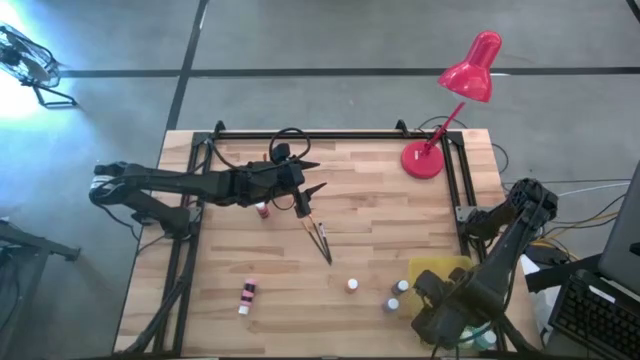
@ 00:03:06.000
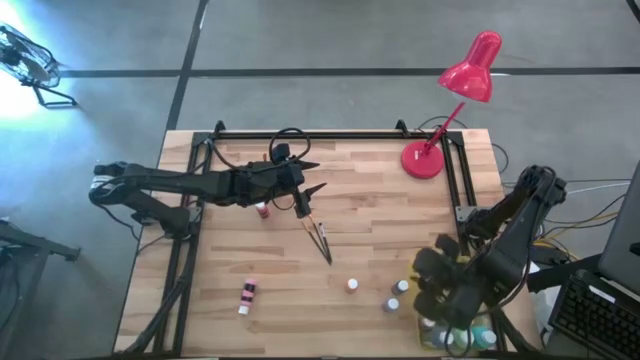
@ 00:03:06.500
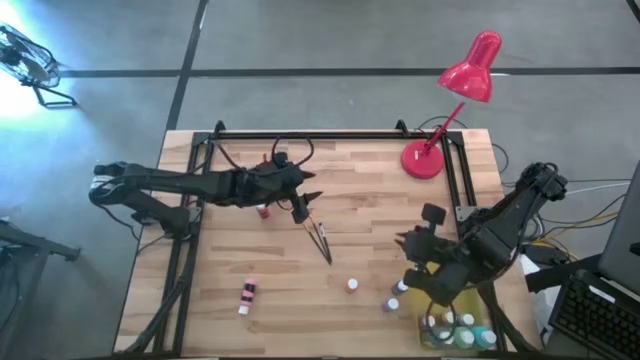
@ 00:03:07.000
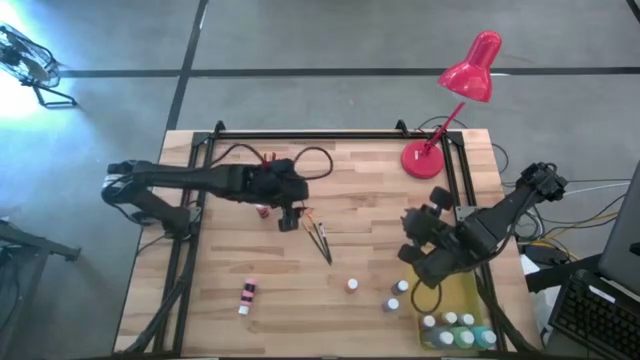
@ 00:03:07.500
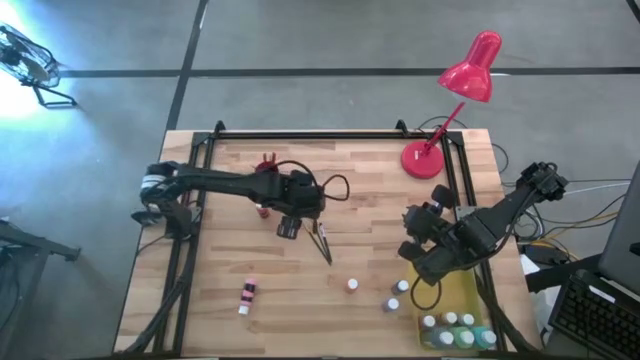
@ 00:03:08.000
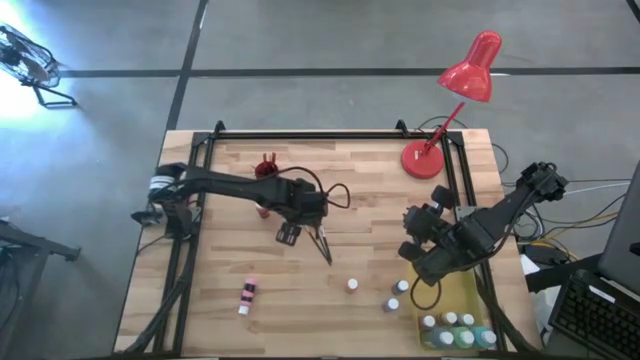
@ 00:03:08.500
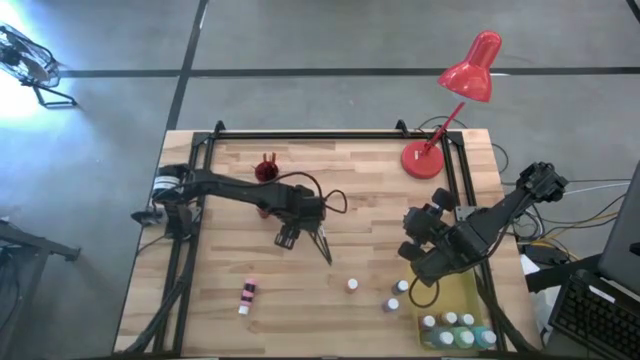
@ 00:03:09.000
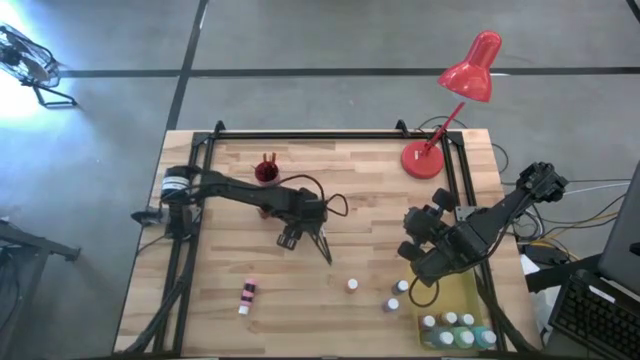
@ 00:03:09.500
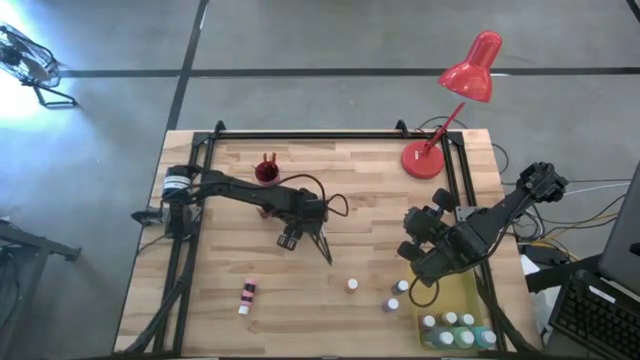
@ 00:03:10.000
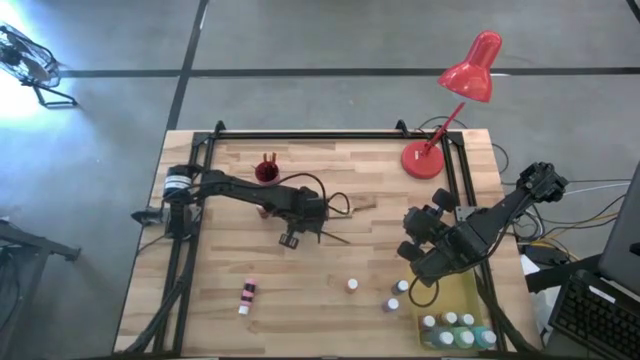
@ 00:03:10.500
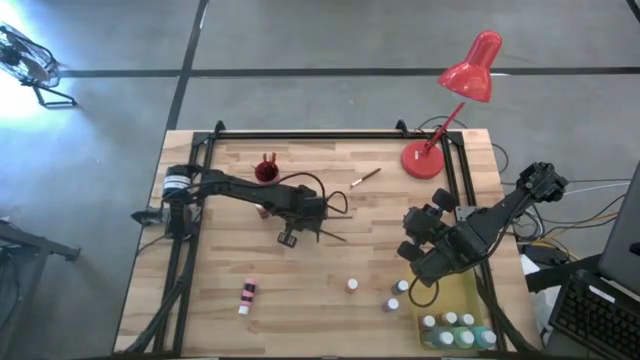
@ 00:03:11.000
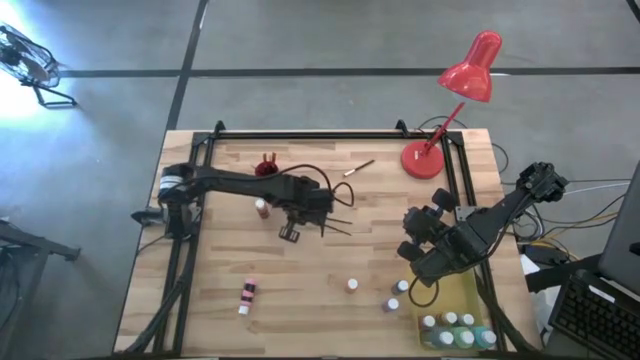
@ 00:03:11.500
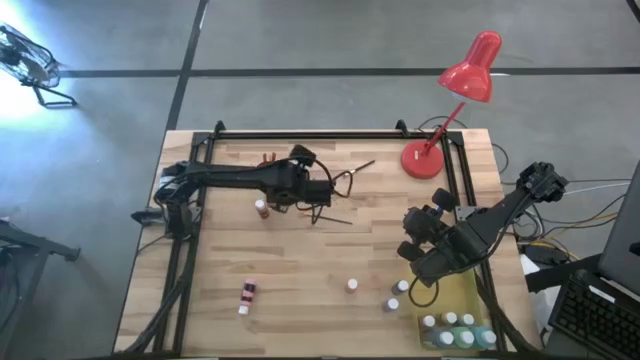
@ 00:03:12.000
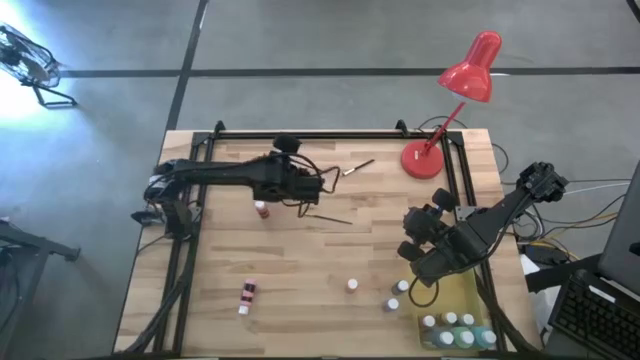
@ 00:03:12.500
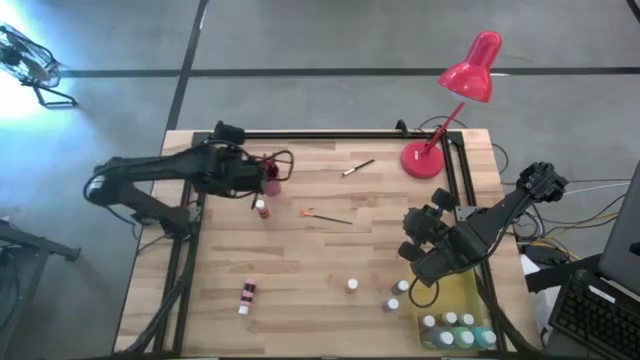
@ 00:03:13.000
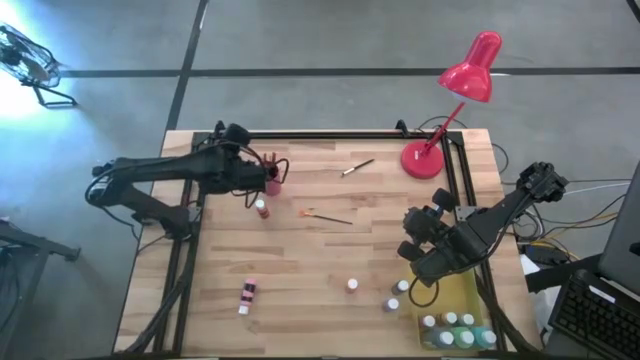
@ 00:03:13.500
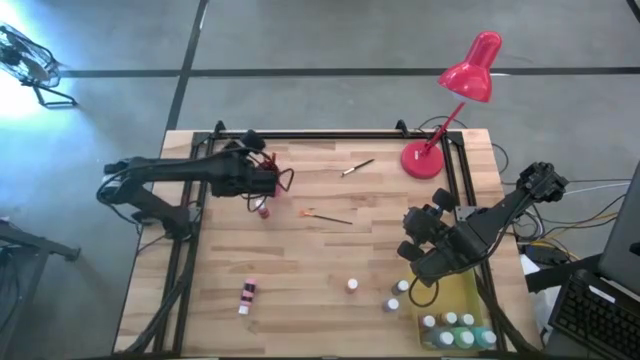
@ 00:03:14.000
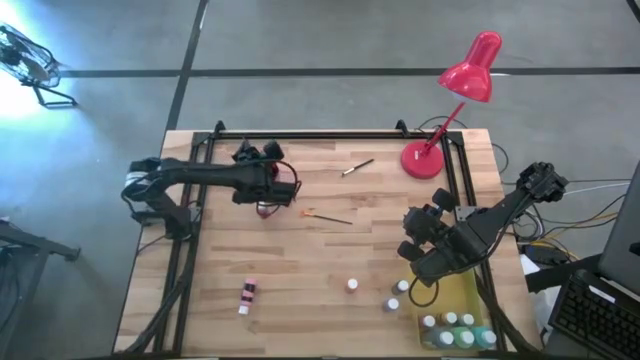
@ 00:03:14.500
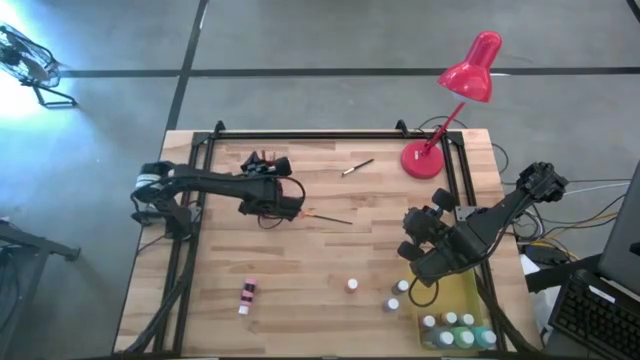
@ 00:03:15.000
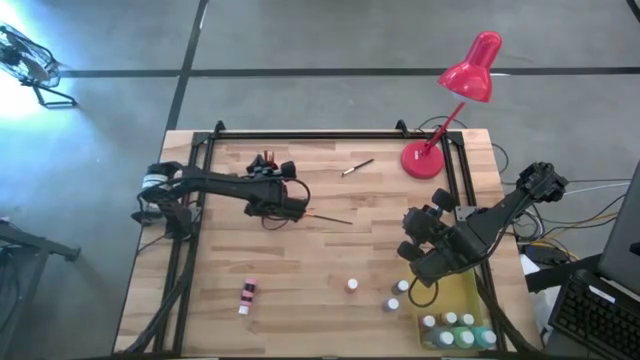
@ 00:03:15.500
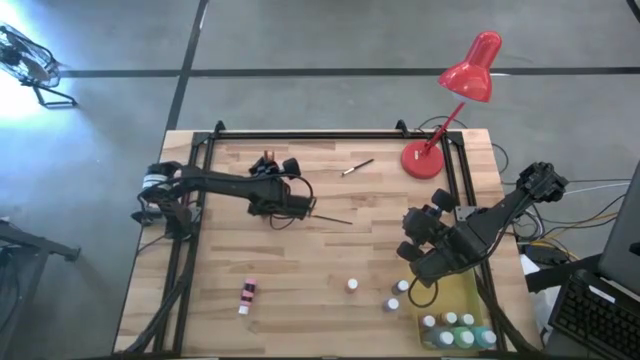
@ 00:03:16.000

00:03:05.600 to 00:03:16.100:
Task: Pick & Place Paint Supplies
Put the black paint brush into the pink cup

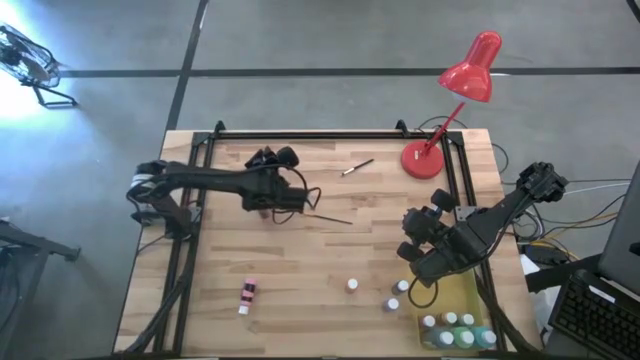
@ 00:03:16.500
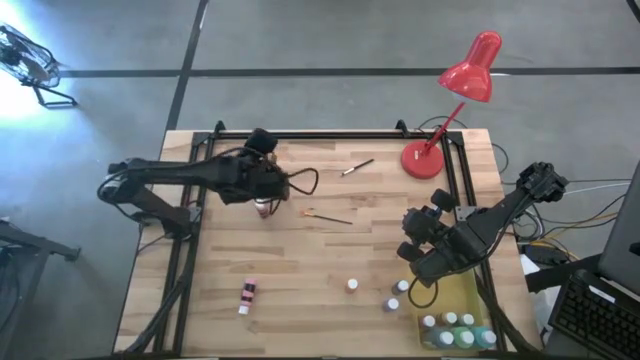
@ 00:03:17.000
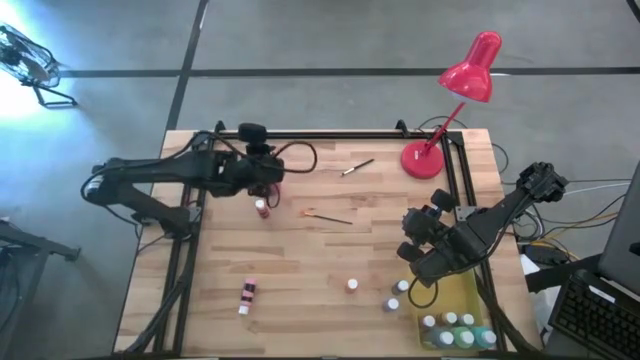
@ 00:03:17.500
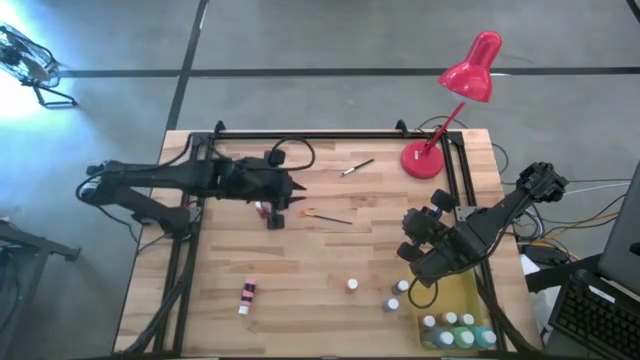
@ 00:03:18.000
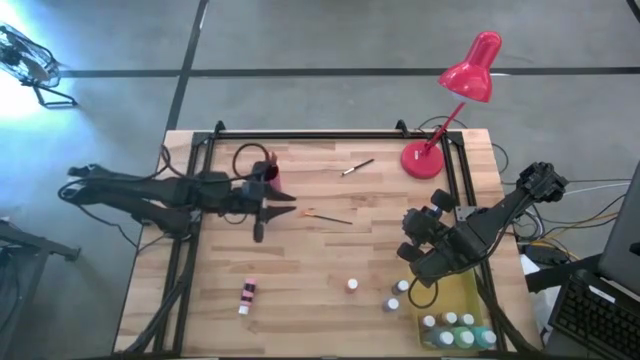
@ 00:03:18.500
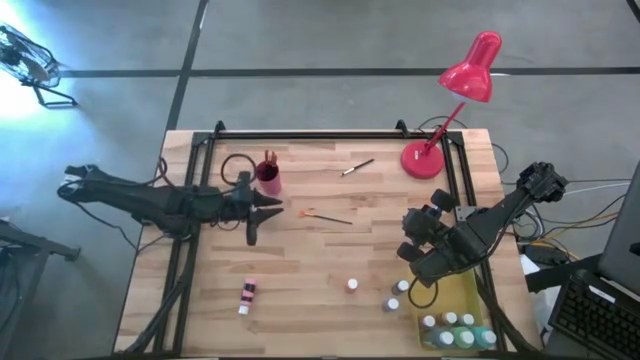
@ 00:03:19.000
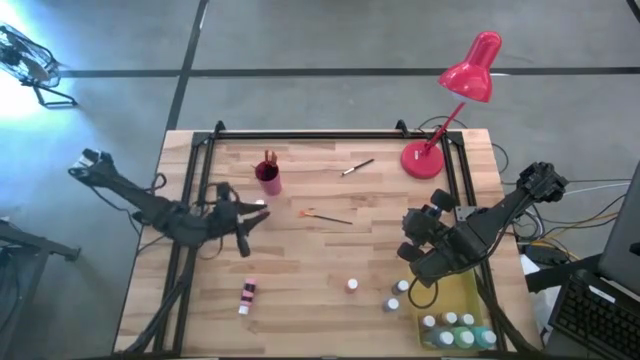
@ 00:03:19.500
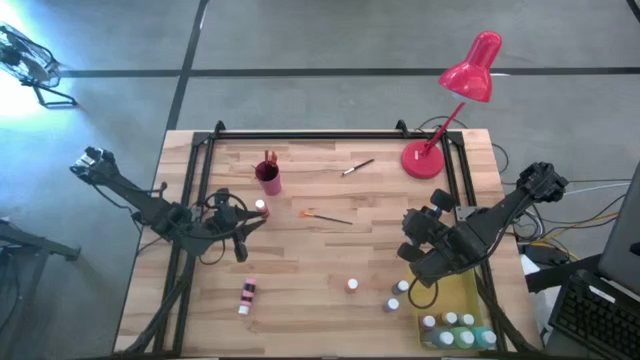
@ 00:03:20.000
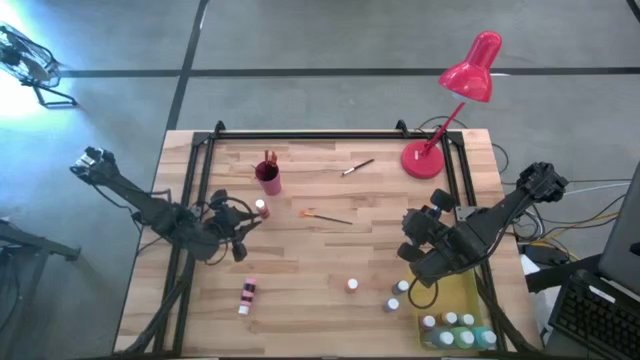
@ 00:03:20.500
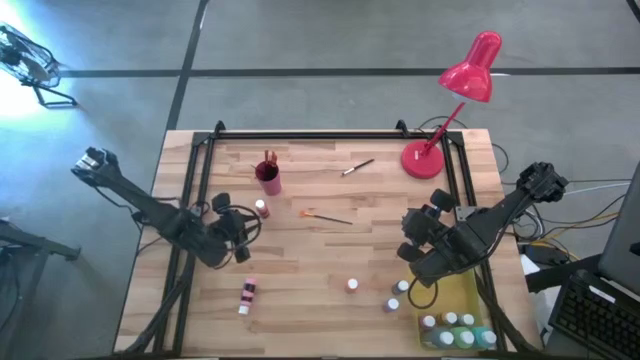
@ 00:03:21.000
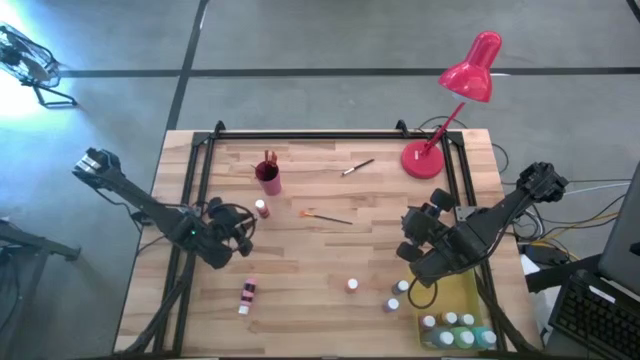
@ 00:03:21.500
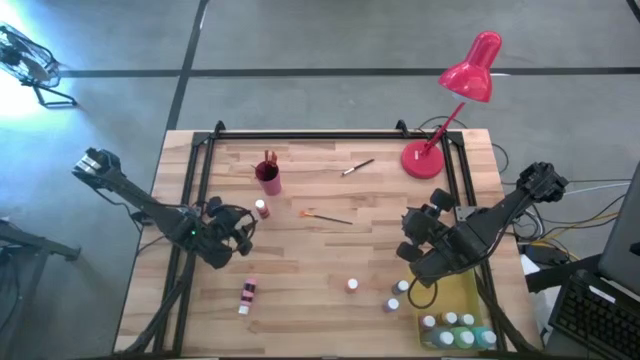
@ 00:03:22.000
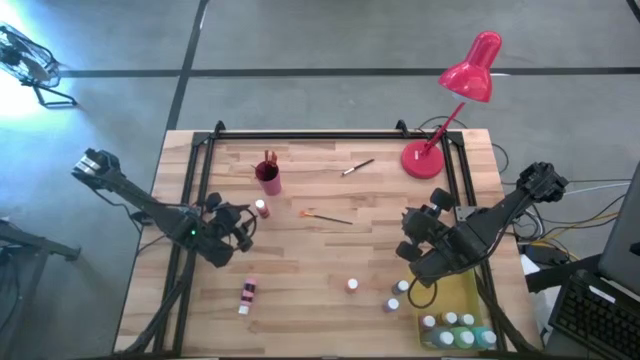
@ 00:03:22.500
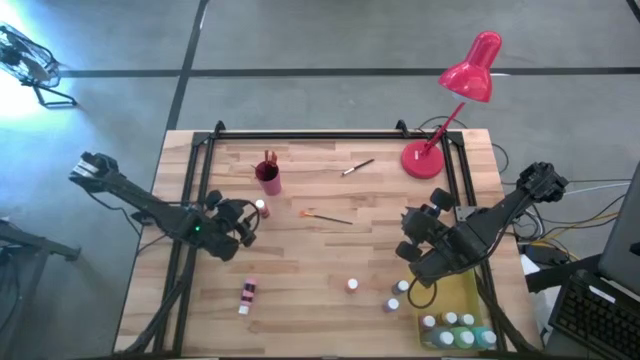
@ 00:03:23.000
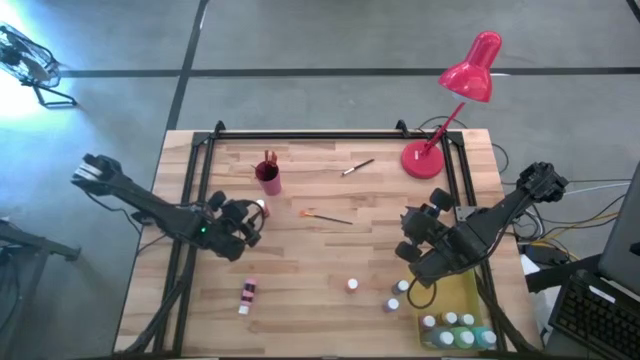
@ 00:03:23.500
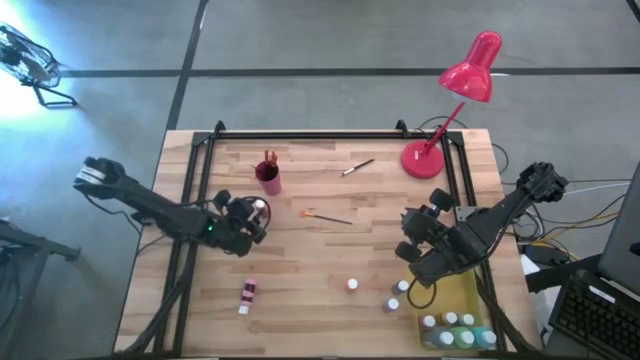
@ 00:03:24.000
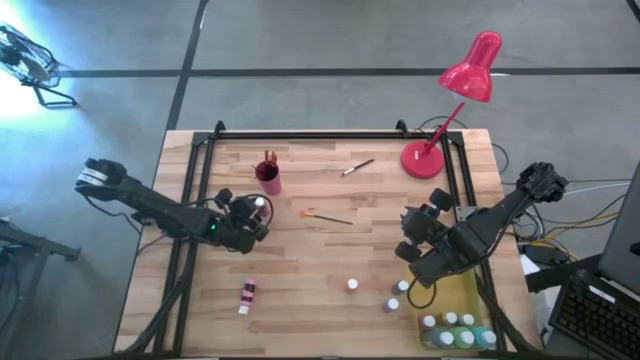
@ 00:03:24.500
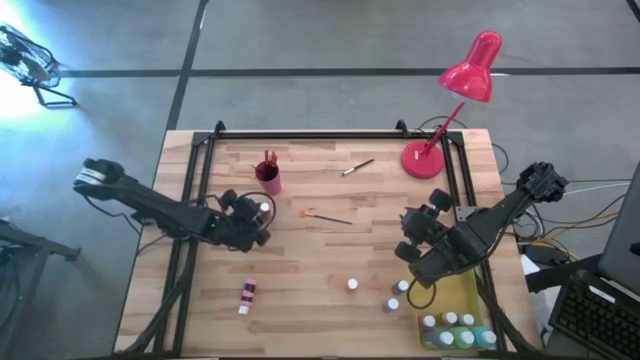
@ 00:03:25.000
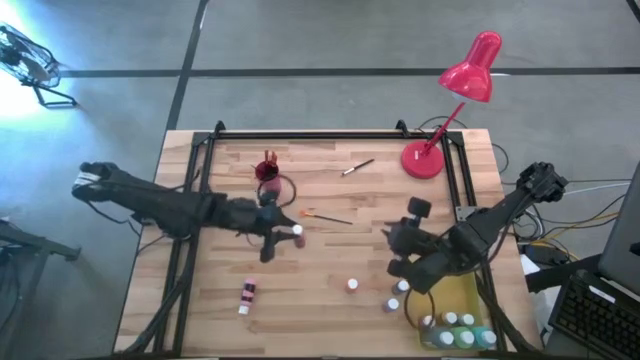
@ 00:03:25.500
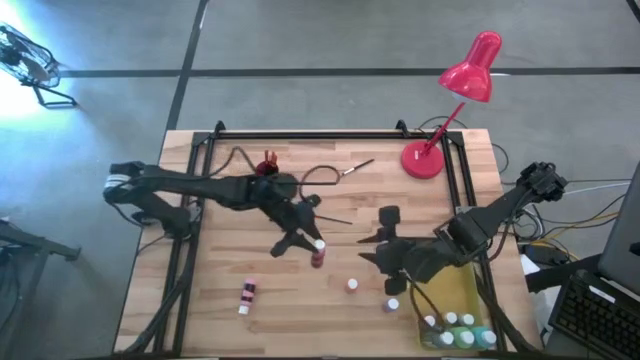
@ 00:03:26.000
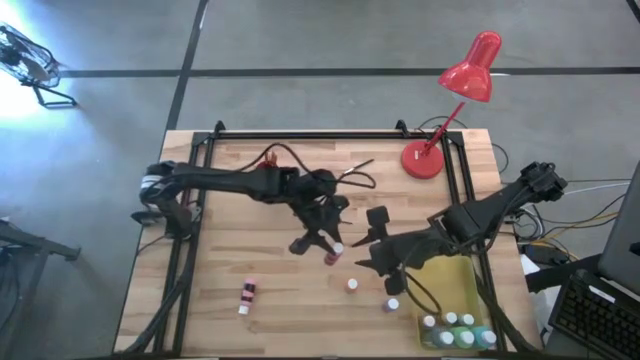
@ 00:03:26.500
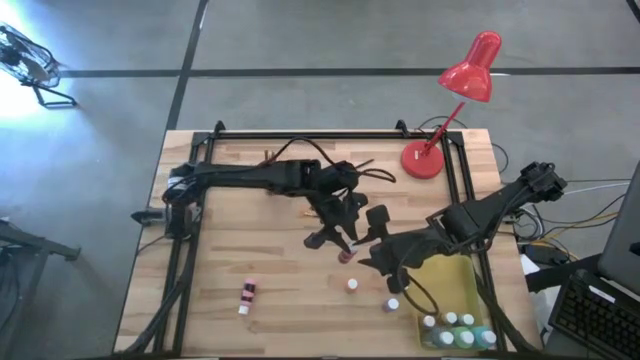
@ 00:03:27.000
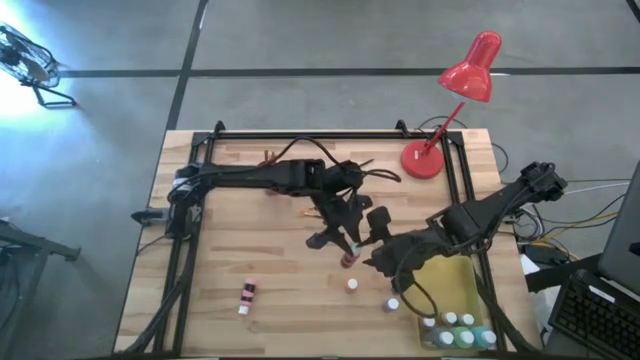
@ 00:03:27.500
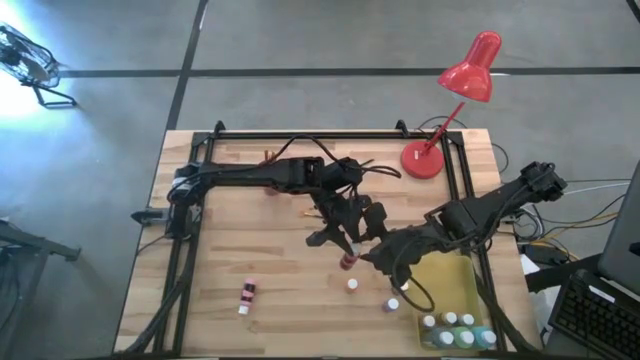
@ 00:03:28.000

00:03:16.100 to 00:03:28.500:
Put the red paint bottle into the yellow bin
